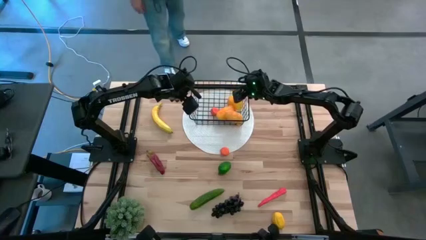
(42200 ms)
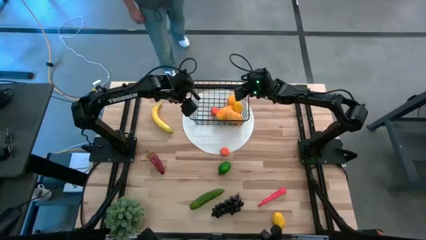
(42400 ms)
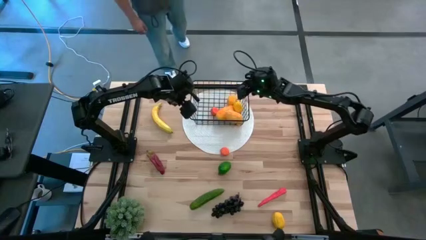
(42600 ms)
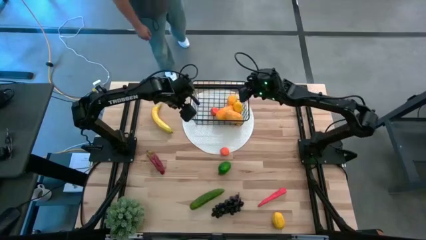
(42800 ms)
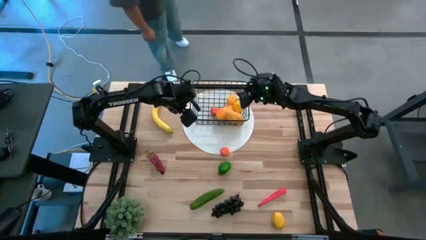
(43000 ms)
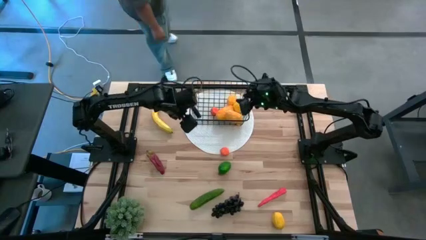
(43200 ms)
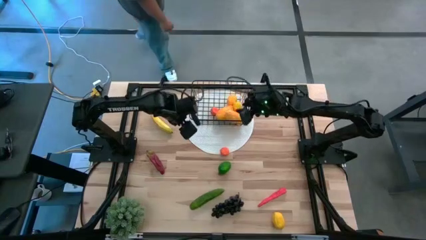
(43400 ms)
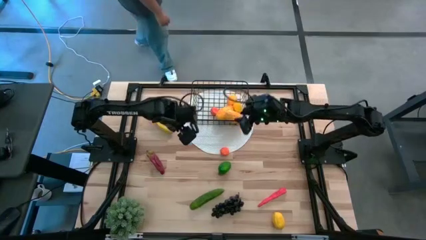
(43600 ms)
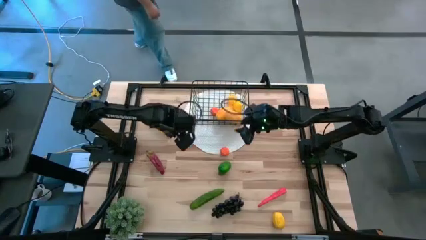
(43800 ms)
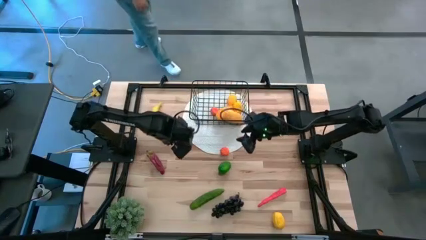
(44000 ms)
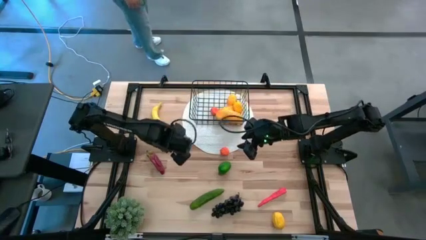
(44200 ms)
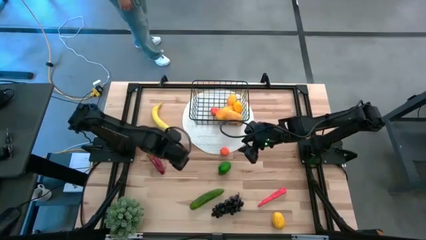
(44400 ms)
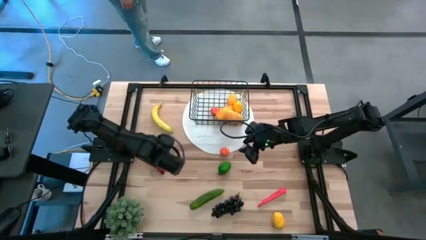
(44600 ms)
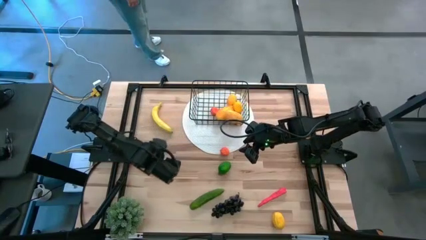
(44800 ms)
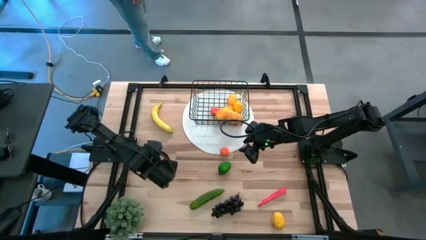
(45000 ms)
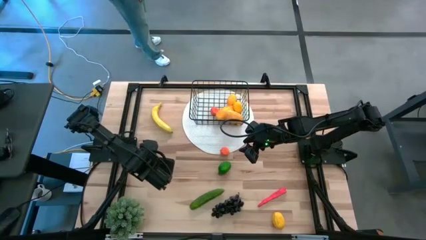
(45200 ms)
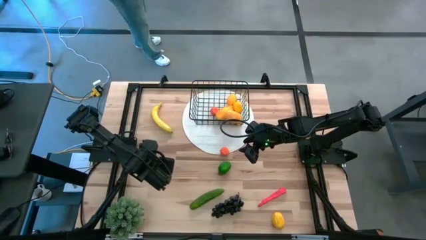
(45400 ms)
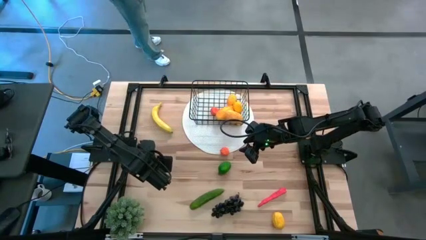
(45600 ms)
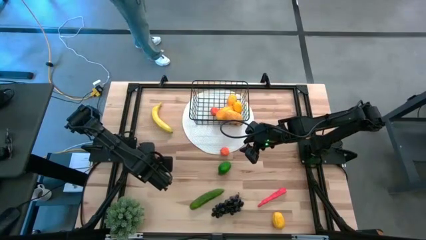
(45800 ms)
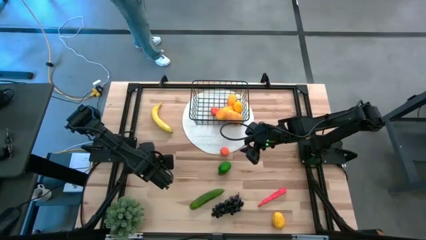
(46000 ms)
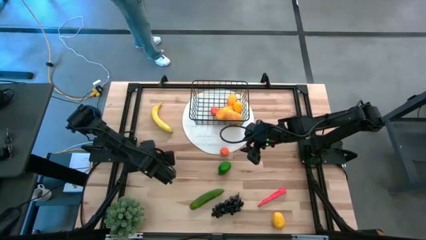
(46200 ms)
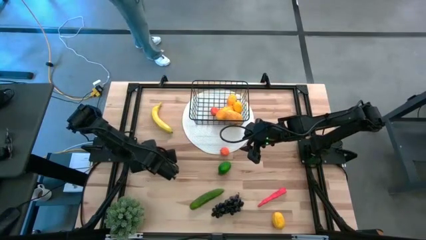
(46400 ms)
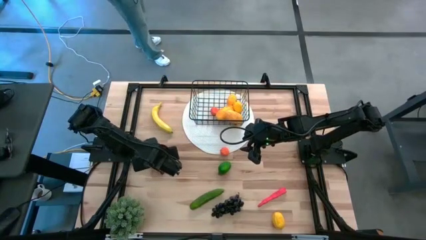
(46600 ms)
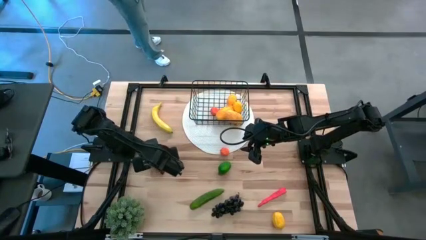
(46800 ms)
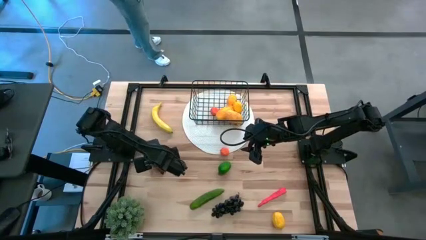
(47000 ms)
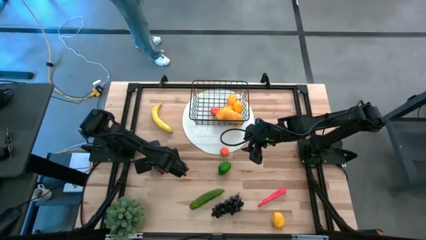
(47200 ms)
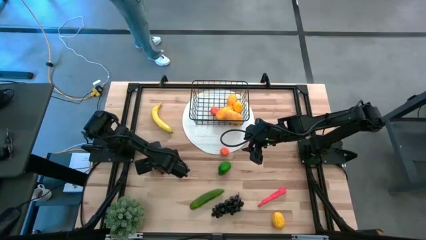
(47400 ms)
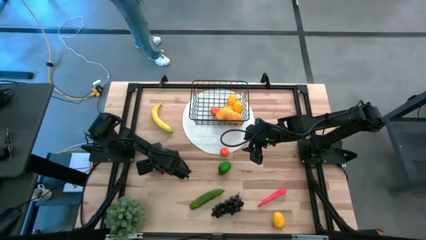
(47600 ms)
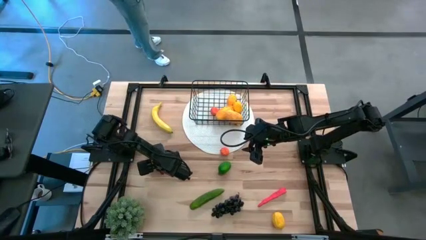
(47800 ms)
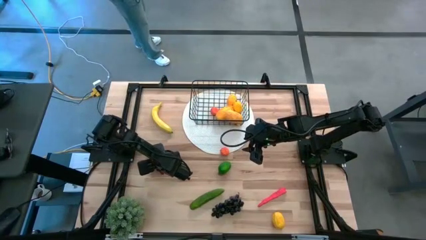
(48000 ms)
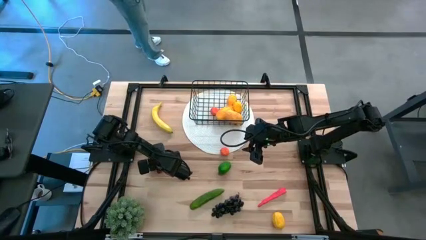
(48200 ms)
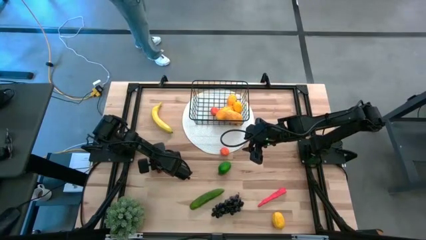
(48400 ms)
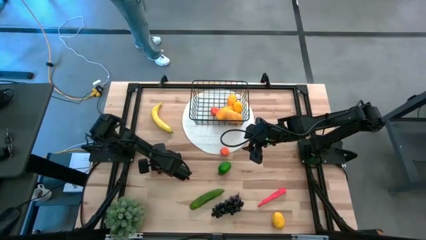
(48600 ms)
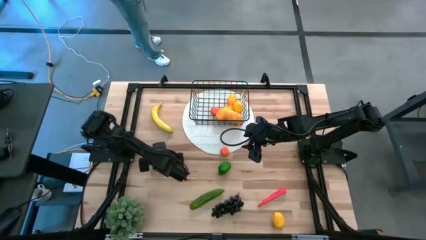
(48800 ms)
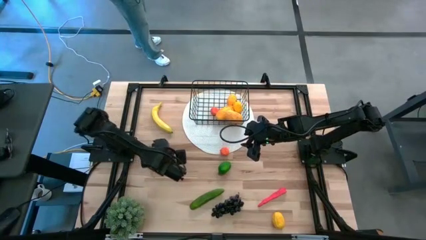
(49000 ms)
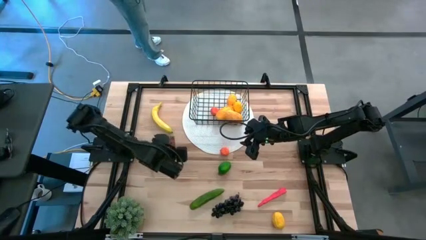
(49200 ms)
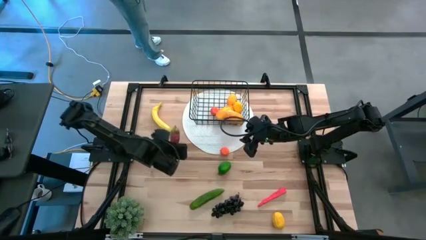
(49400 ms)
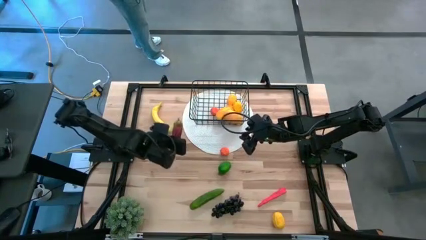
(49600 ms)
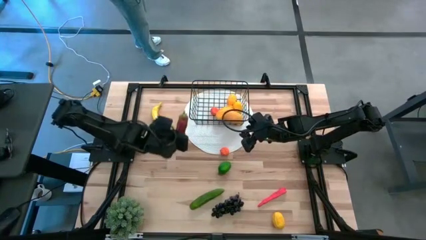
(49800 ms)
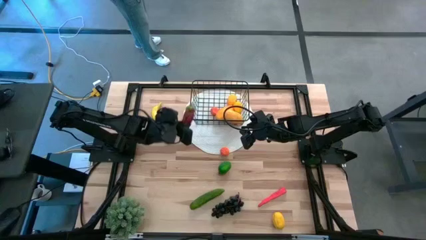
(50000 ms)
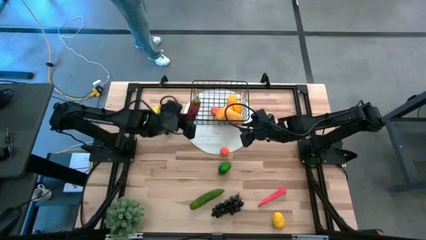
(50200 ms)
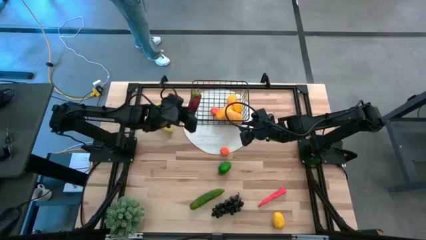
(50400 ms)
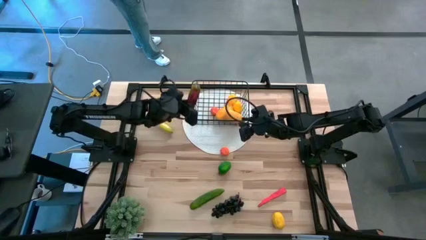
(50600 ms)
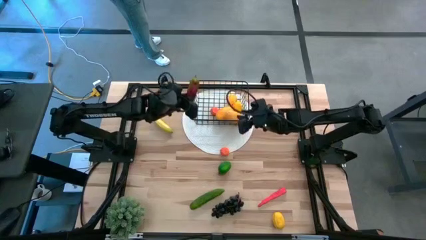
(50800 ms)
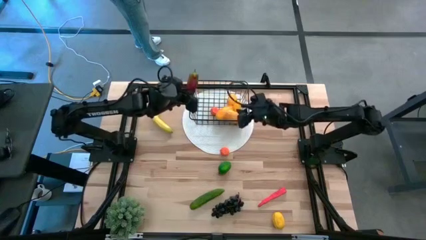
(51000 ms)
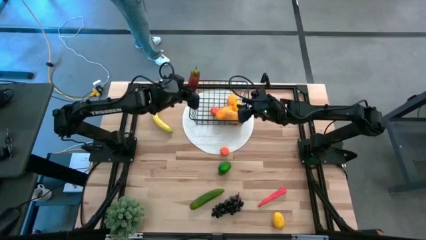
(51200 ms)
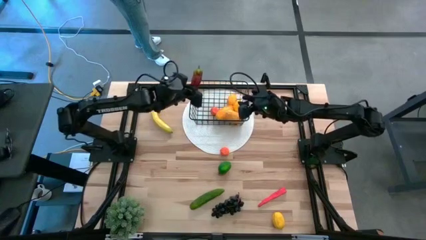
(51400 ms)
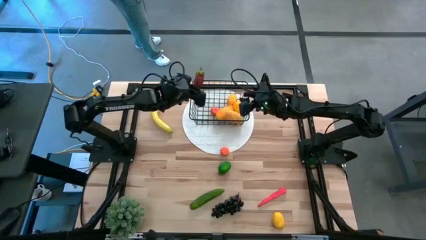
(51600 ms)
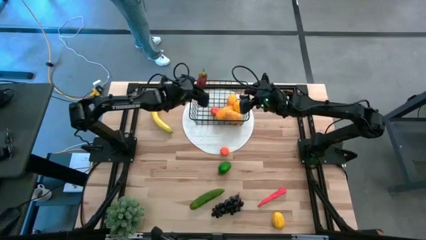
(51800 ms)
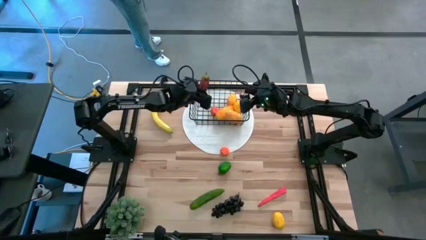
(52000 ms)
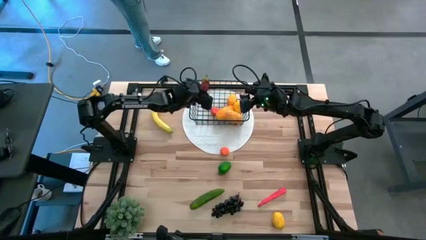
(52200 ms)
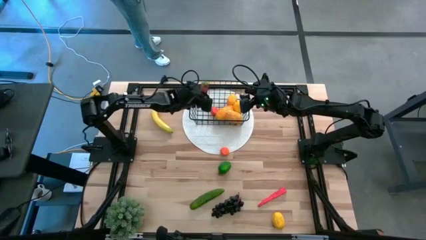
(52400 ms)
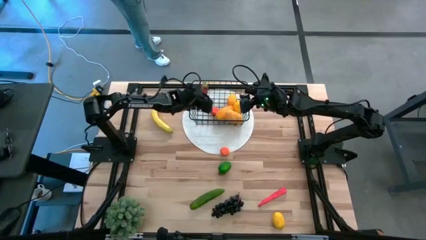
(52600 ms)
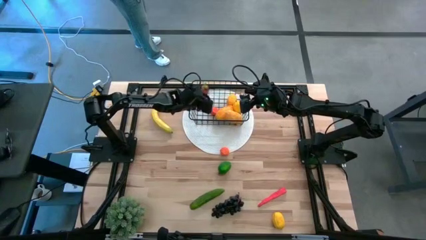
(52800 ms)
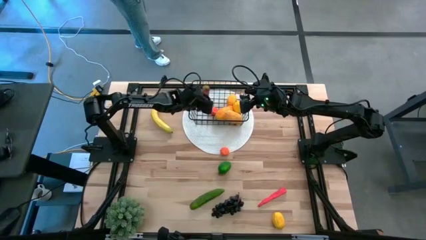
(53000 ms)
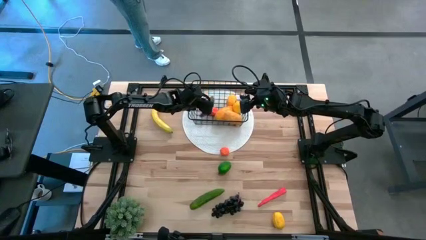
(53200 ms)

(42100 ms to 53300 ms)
Task: Build produce basket
Put the red chili pepper into the wire basket
